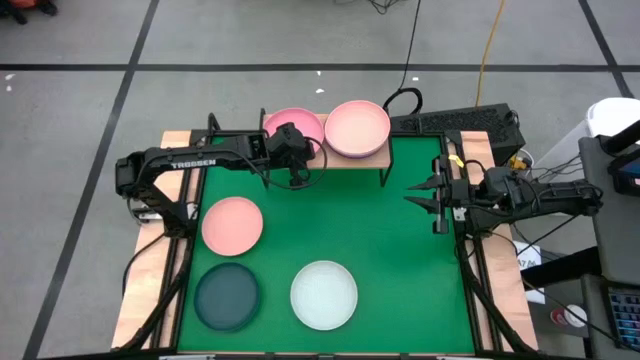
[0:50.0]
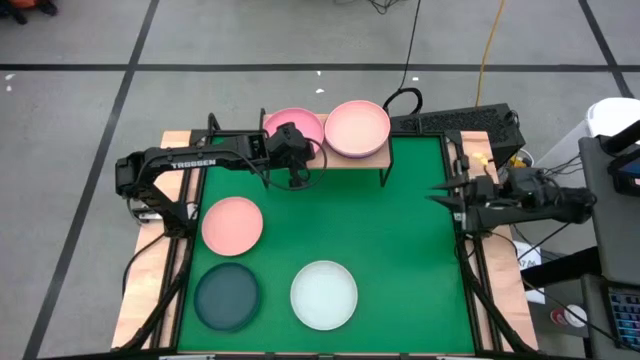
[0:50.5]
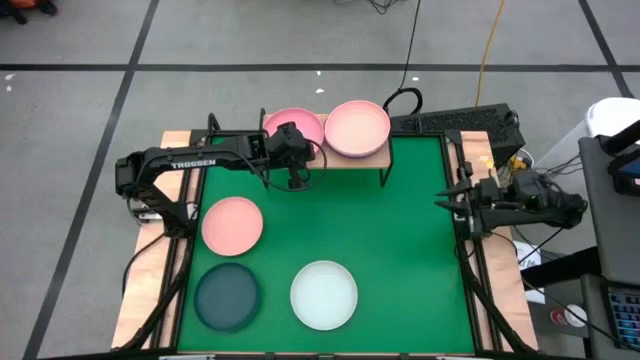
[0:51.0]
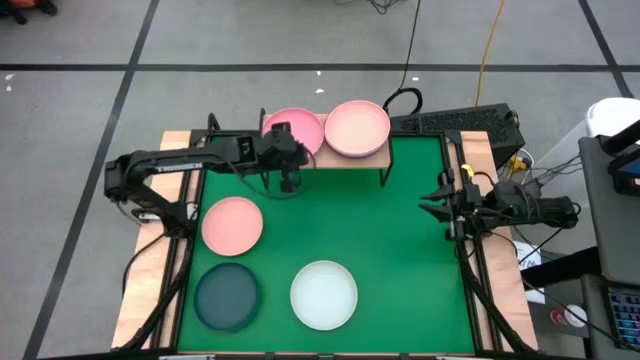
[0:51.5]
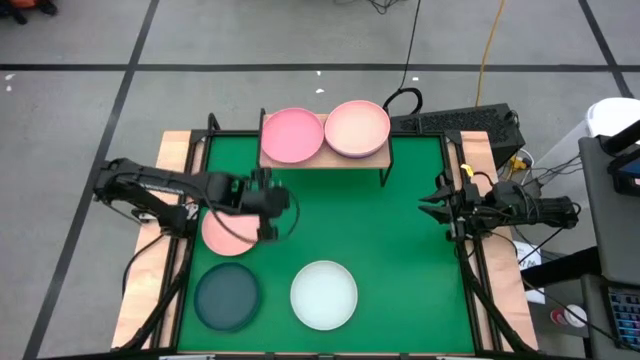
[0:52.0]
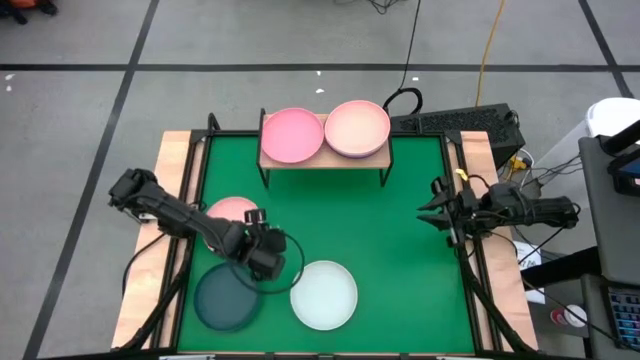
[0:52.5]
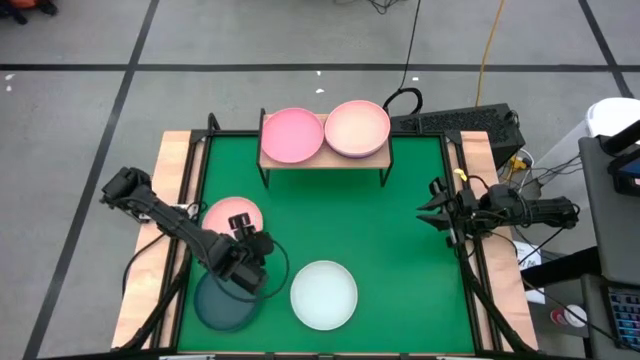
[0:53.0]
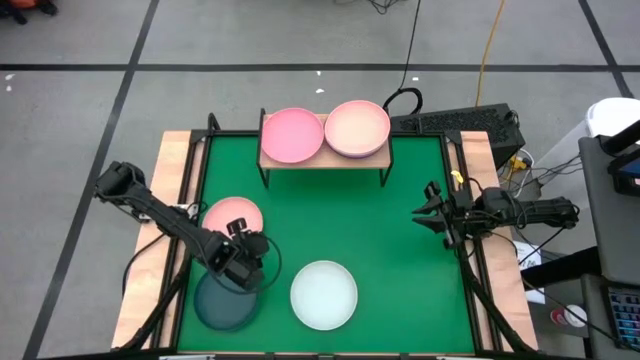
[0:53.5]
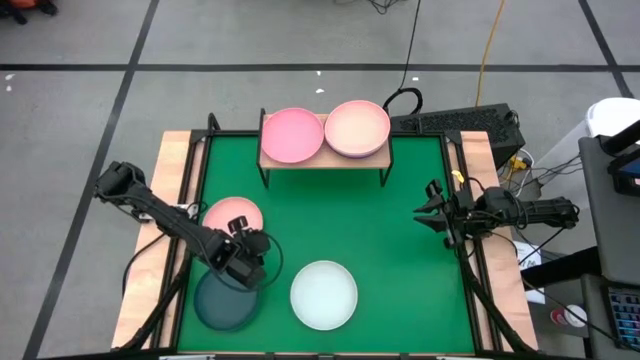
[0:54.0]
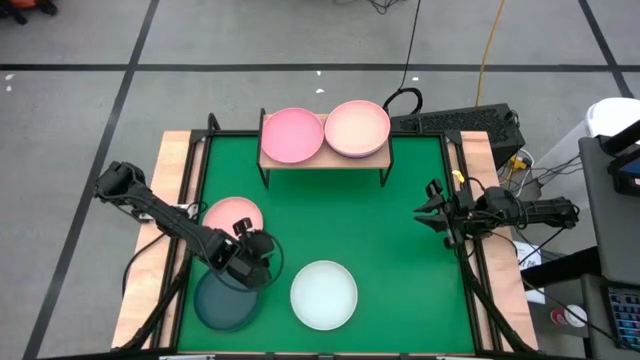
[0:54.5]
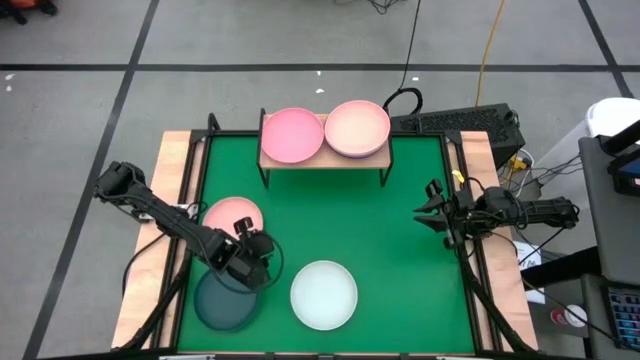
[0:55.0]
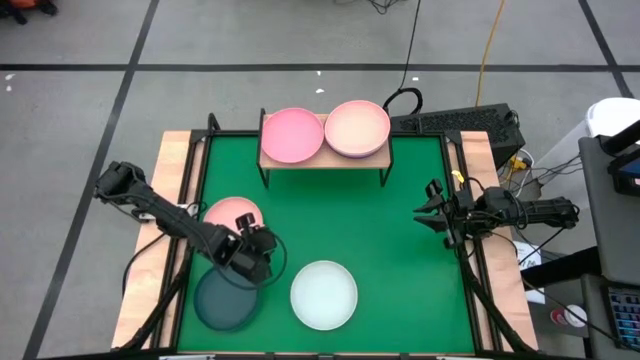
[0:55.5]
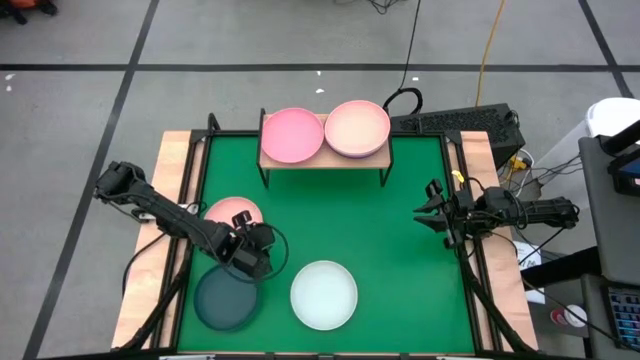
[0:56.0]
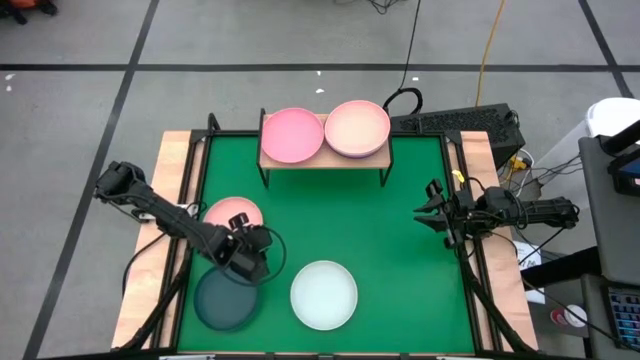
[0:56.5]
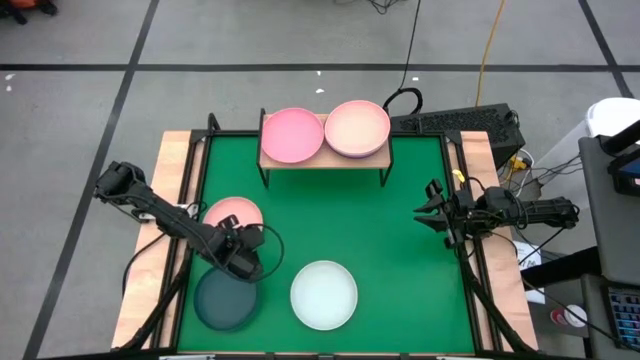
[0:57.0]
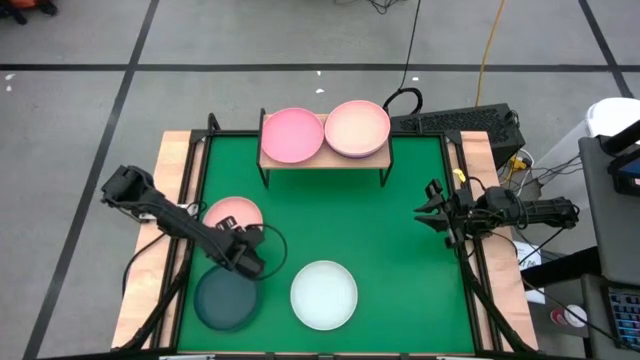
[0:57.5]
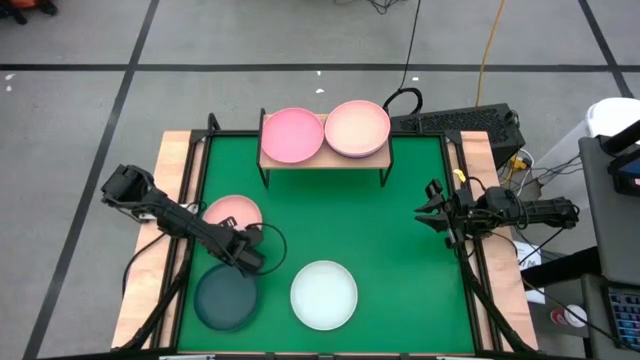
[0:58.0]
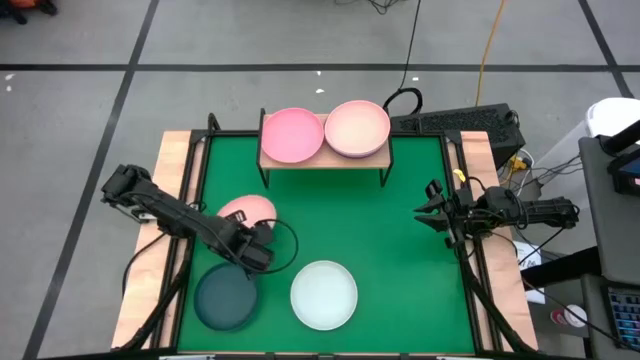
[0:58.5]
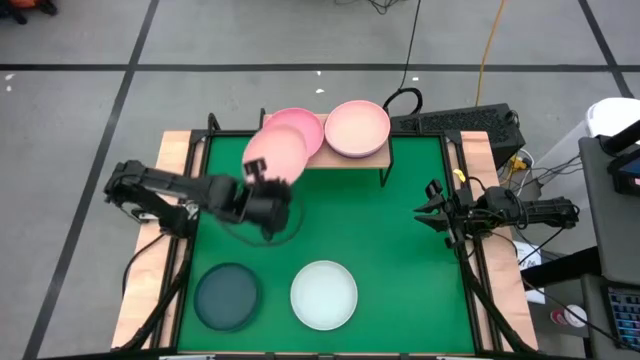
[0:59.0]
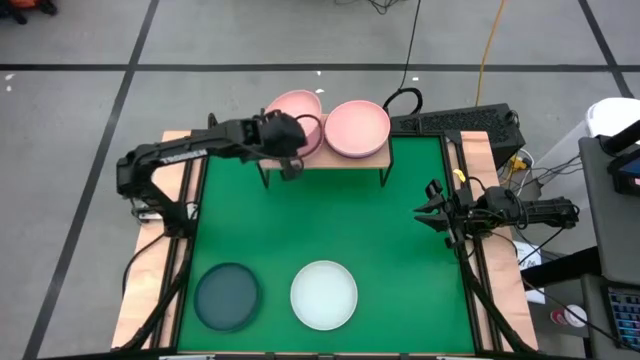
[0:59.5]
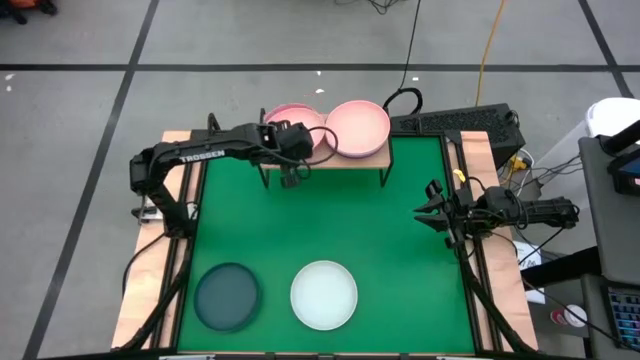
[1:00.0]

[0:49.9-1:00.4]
Task: Place and stack plates onto a shelf
Stack the light orange plate on top of light pink plate on the shelf

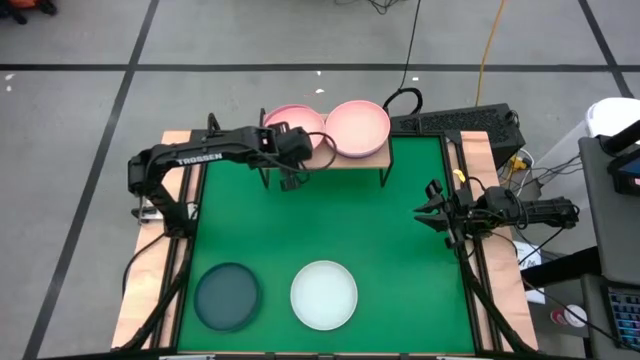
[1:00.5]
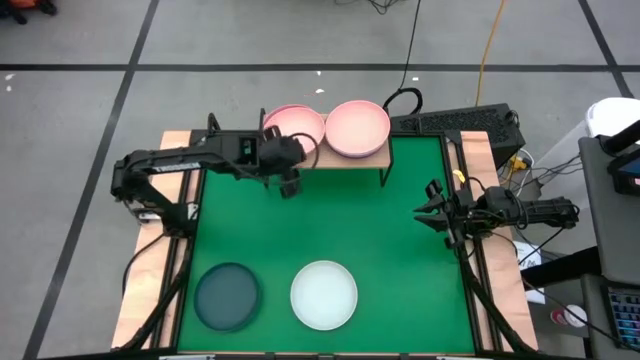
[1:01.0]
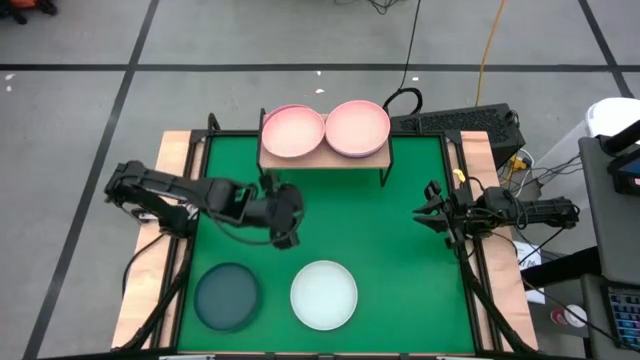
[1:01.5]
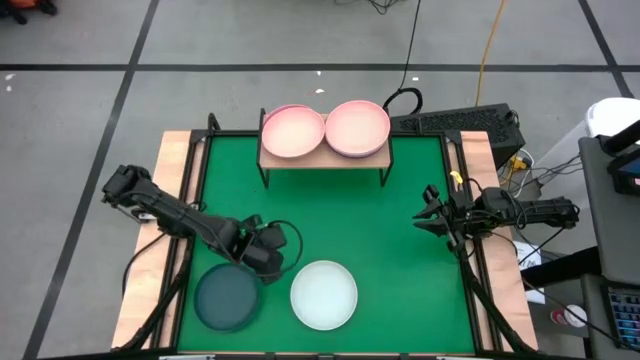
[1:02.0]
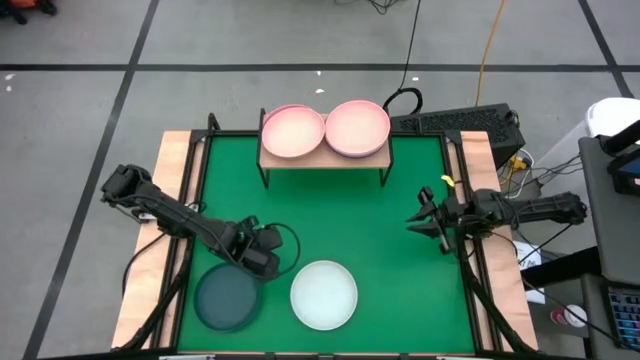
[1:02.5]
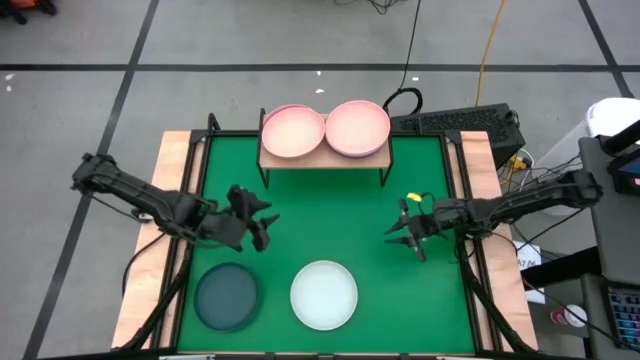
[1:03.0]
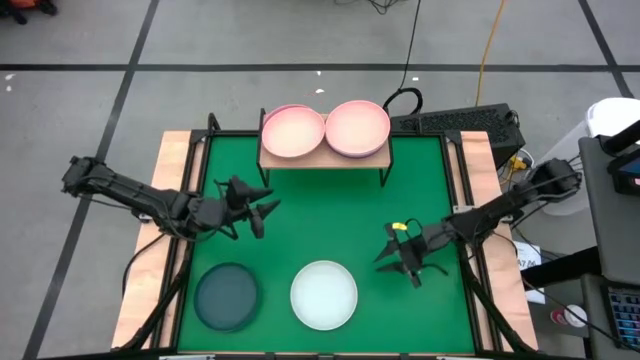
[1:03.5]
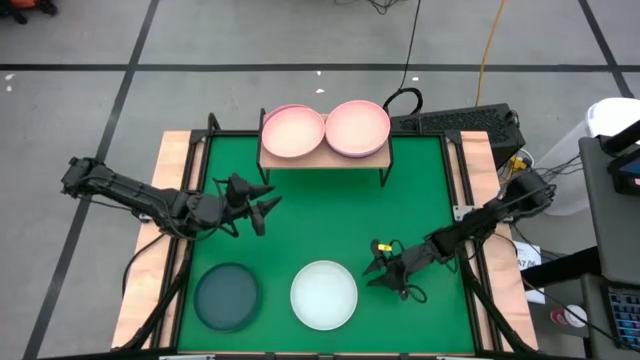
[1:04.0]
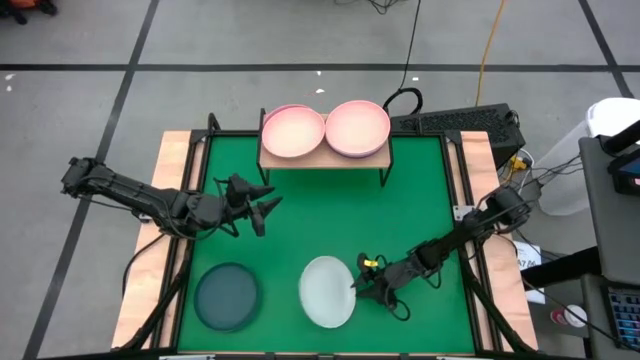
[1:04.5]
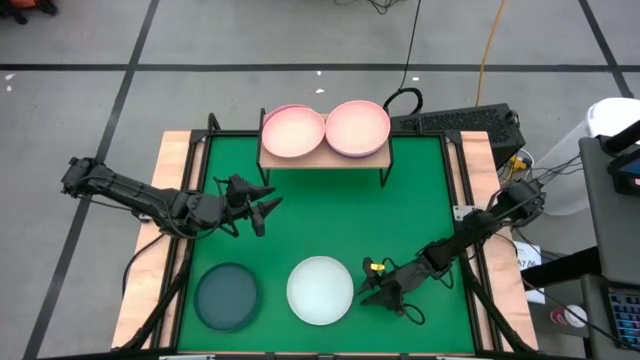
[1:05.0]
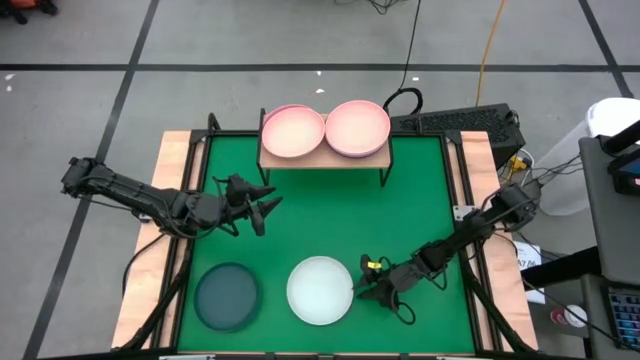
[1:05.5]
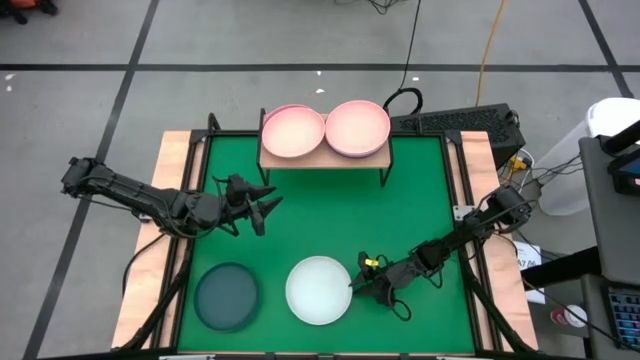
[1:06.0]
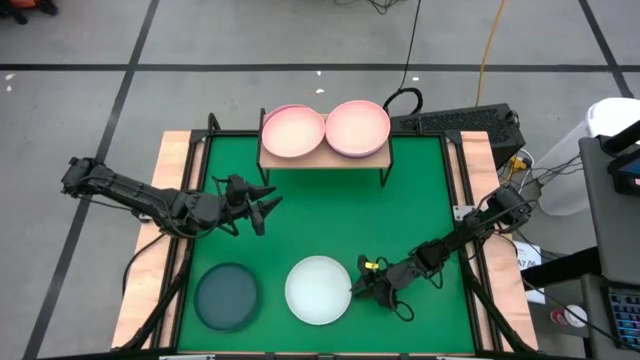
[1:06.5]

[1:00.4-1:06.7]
Stack the white plate on top of light brown plate on the shelf

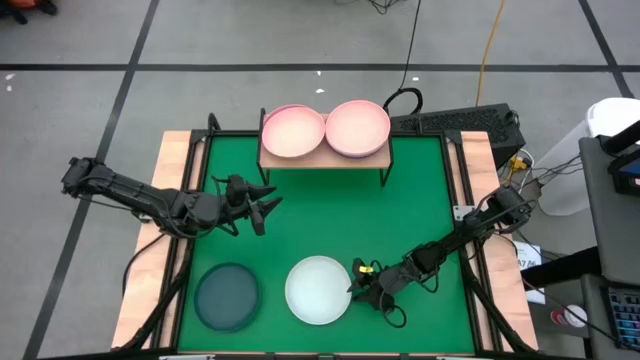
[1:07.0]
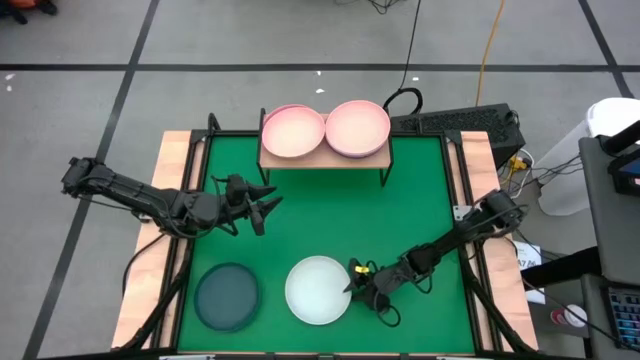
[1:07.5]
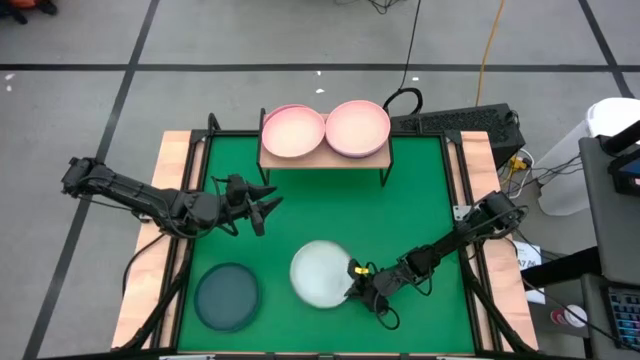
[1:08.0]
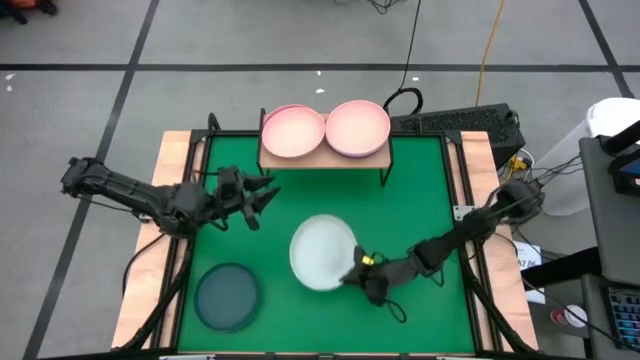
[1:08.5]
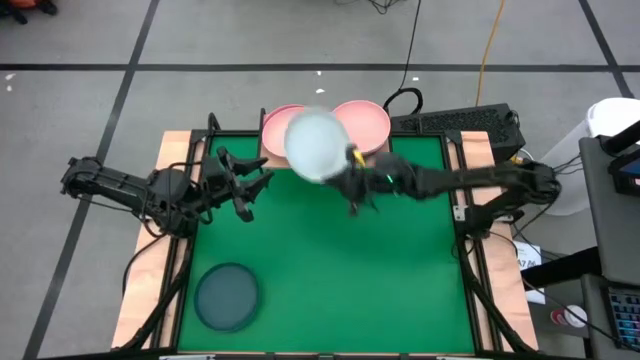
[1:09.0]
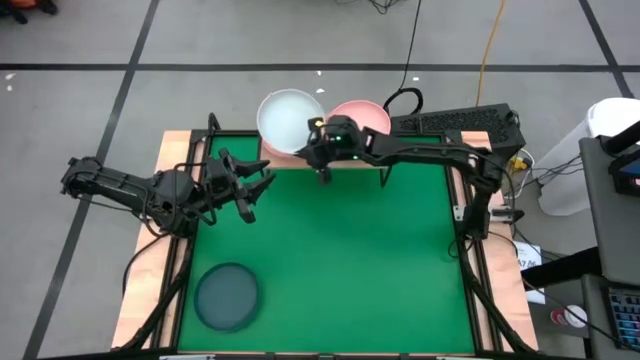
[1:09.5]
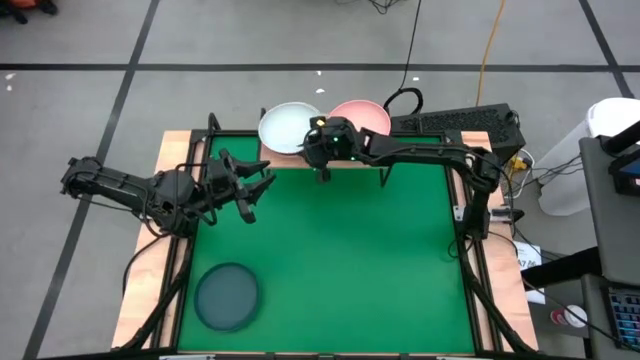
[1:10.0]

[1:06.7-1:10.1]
Stack the white plate on top of light orange plate on the shelf

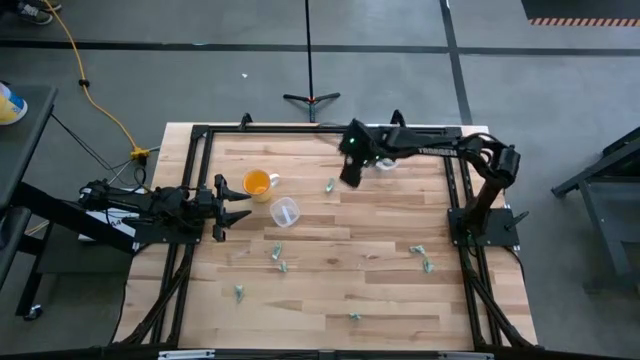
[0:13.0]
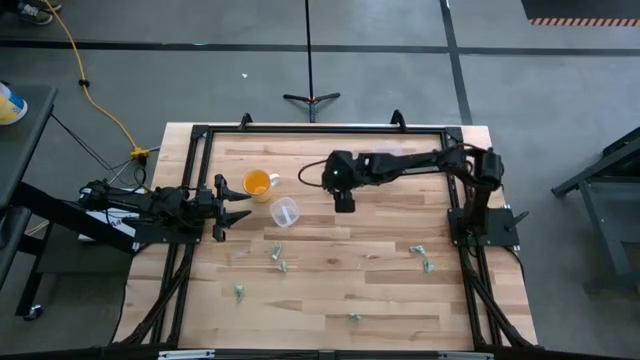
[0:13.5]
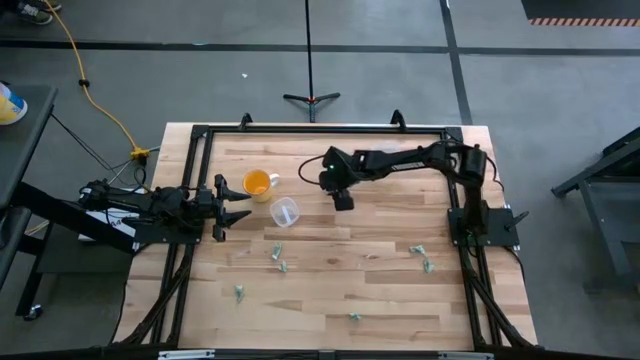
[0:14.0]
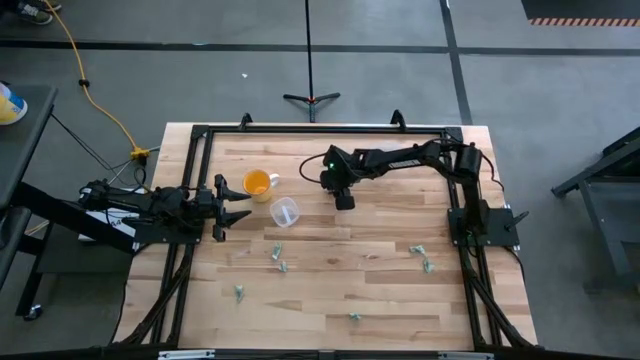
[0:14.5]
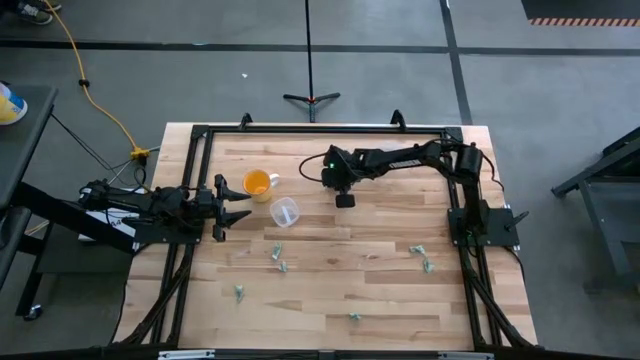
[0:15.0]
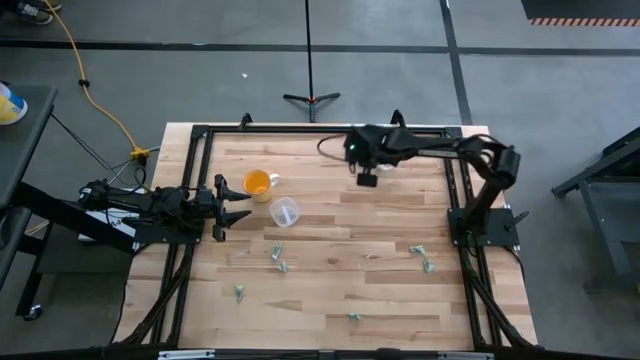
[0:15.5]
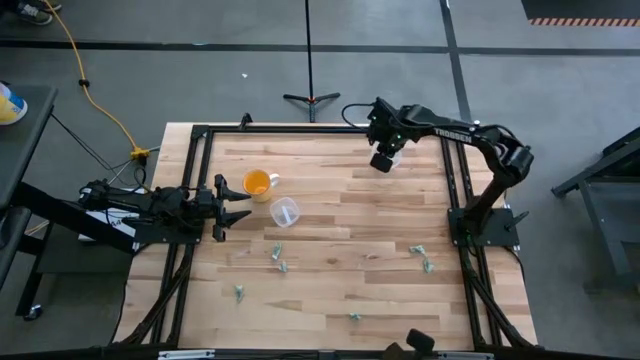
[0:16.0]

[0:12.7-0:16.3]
Task: Pick and place Stevia / Truvia into bins
Put the stevia packet into the top transparent container
